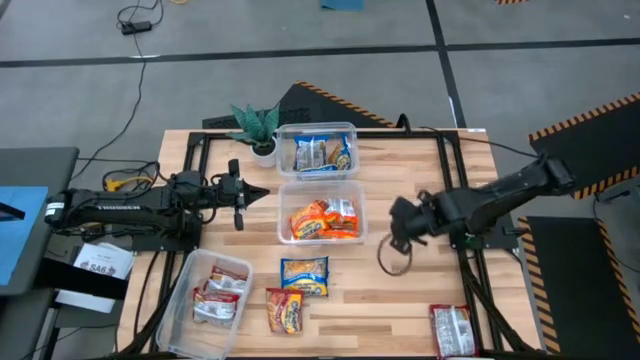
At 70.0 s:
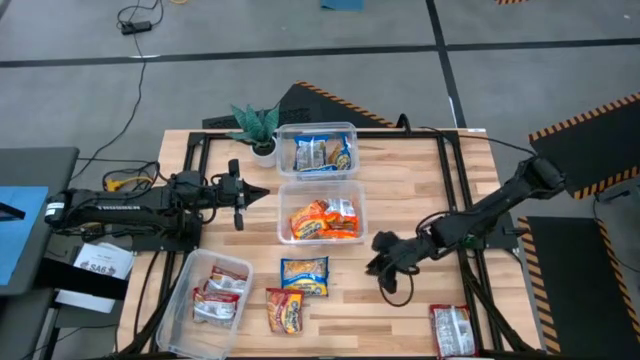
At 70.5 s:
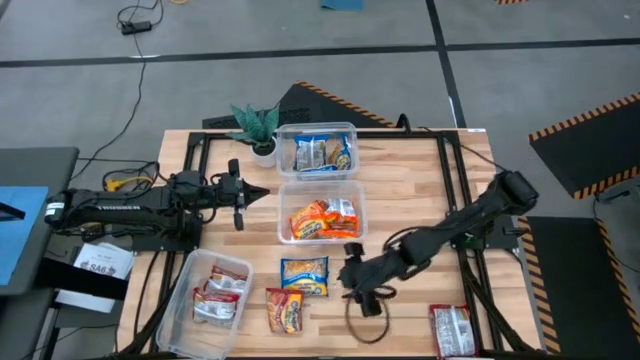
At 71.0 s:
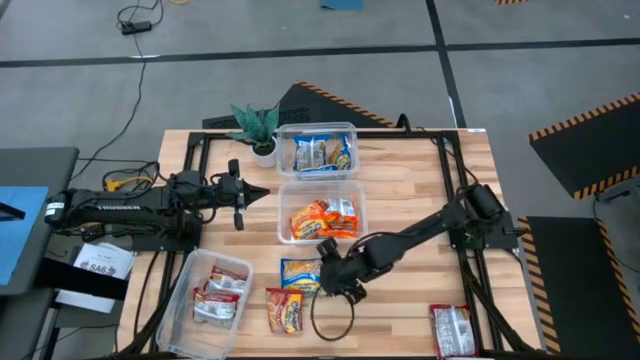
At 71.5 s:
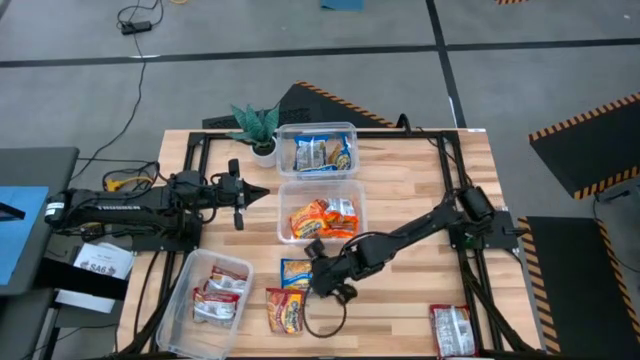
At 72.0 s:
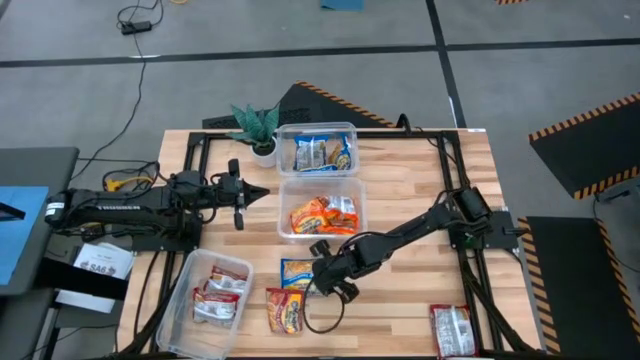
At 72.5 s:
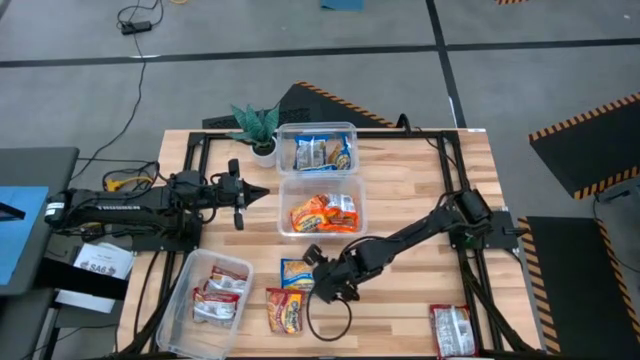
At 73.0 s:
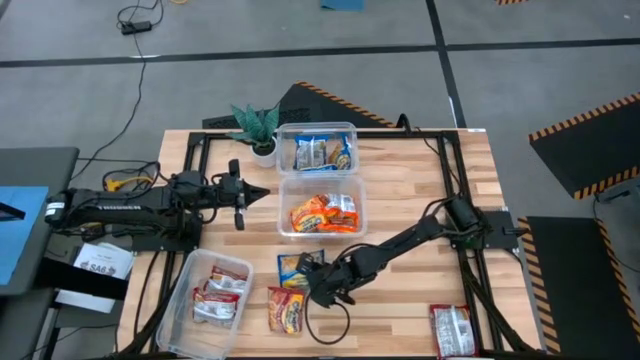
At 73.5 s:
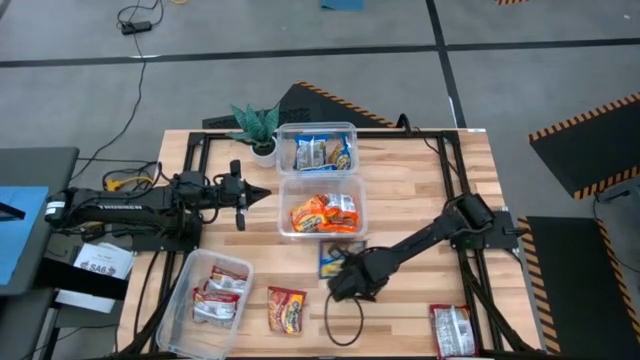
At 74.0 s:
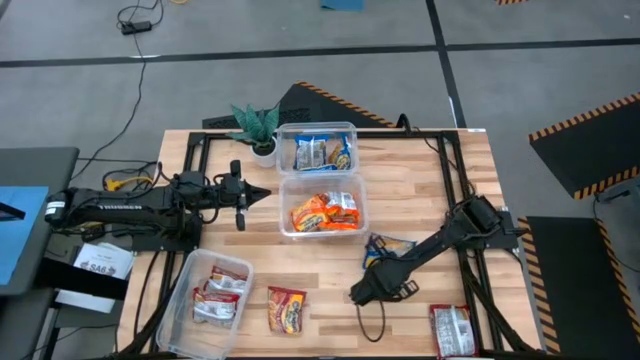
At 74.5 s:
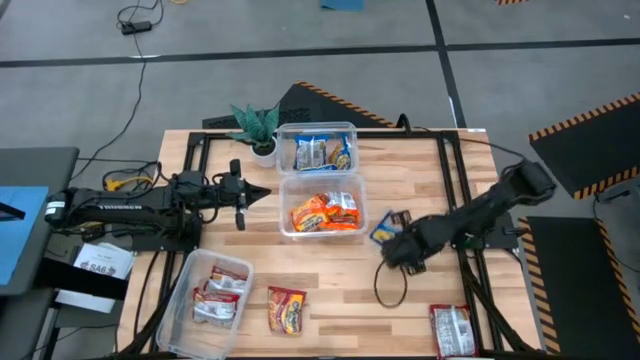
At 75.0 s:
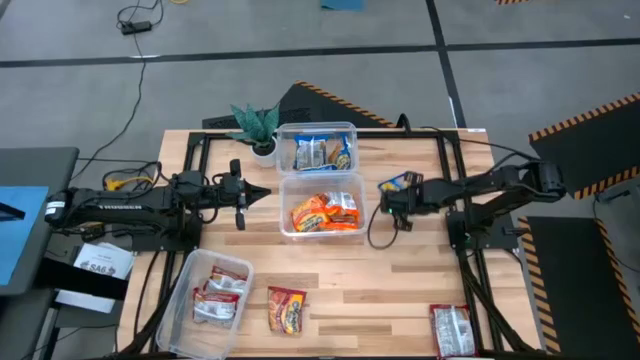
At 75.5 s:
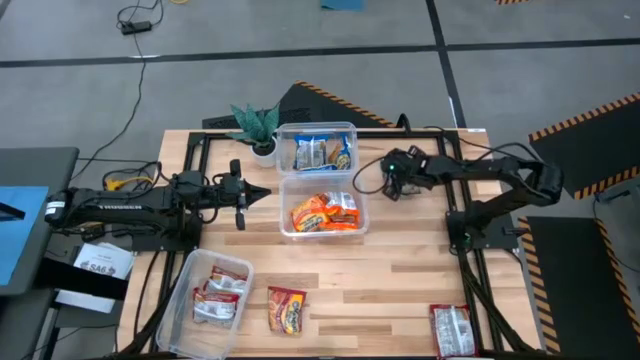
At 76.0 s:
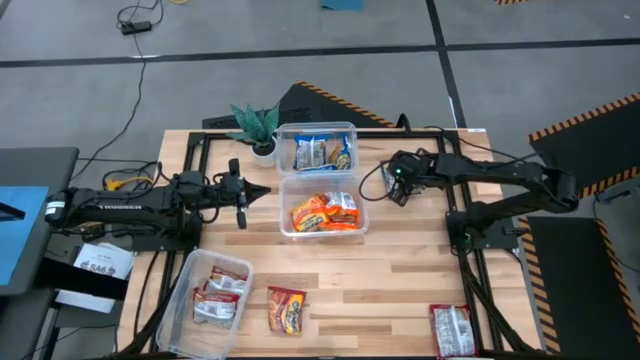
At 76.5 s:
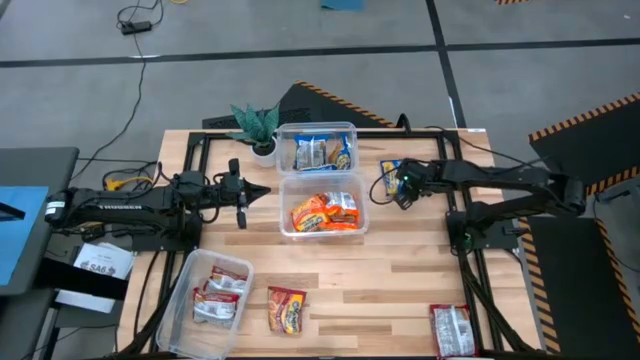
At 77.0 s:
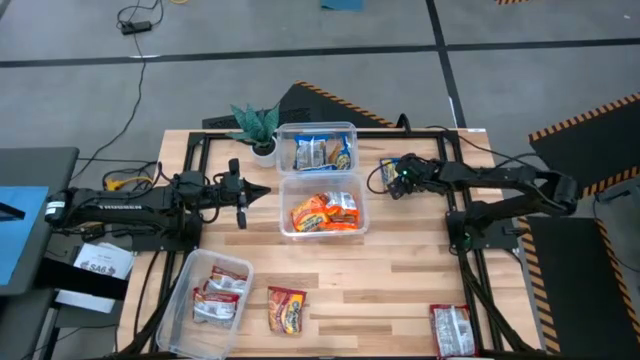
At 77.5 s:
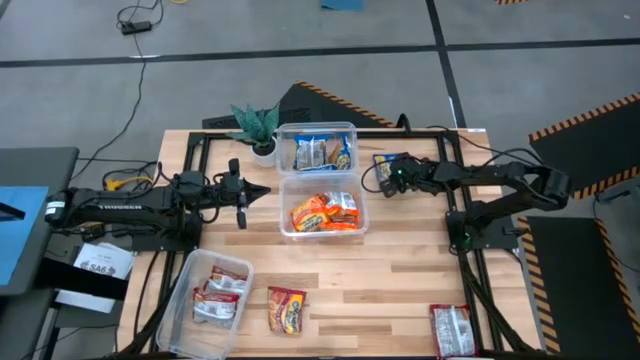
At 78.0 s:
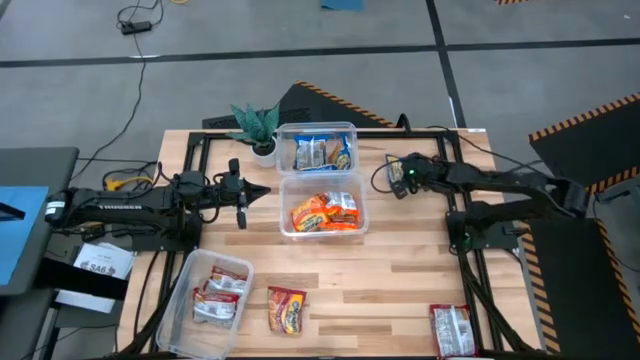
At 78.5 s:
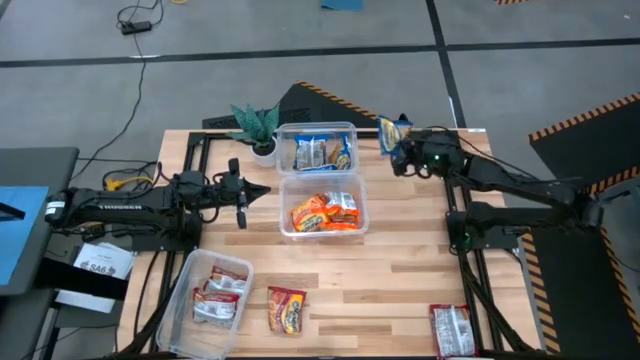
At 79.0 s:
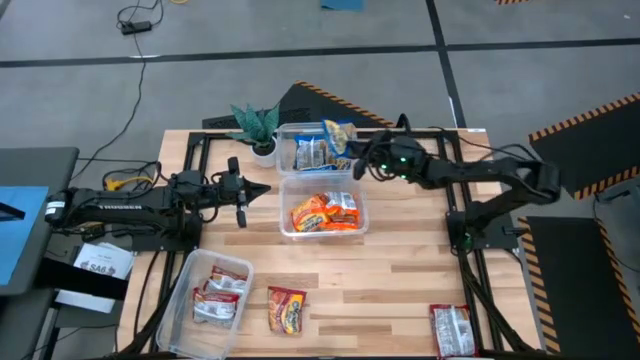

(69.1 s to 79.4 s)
Task: Sort Maruchan noodles
Put the blue noodle pack into the top transparent bin

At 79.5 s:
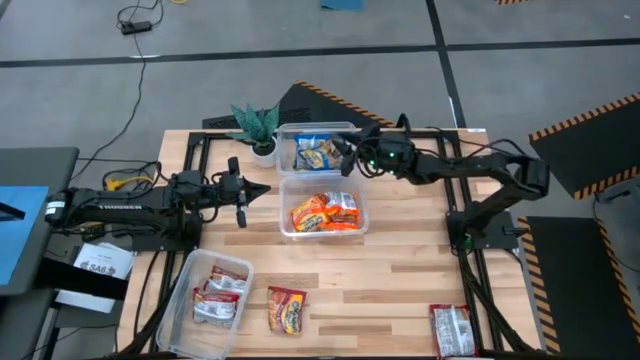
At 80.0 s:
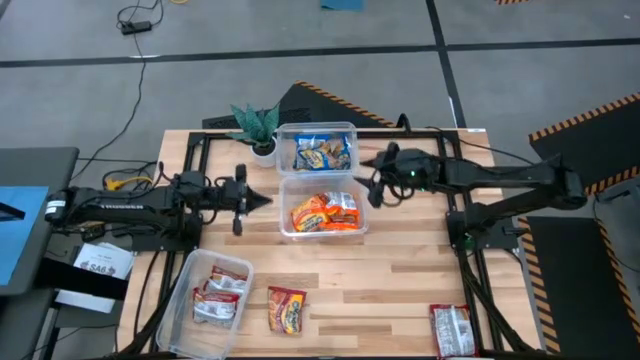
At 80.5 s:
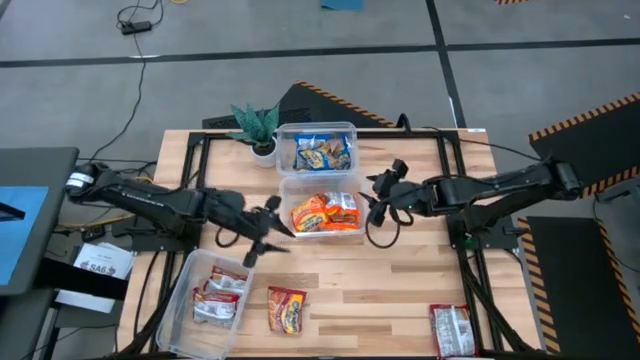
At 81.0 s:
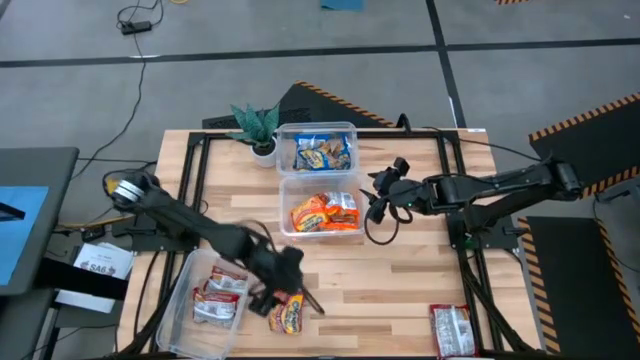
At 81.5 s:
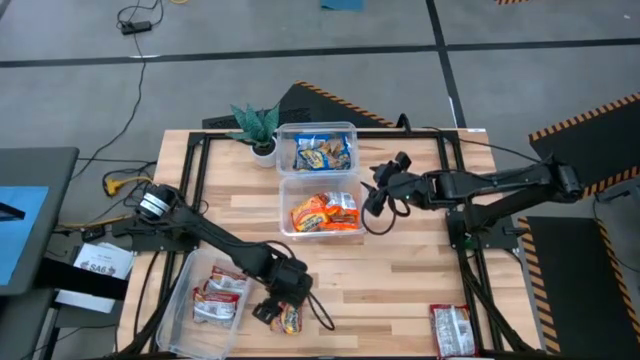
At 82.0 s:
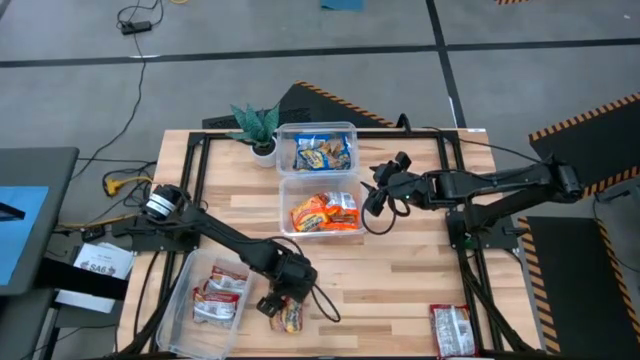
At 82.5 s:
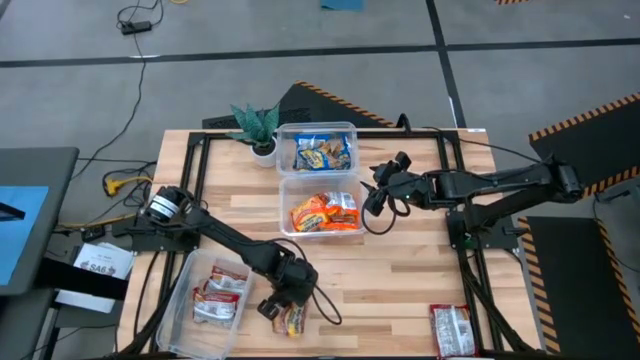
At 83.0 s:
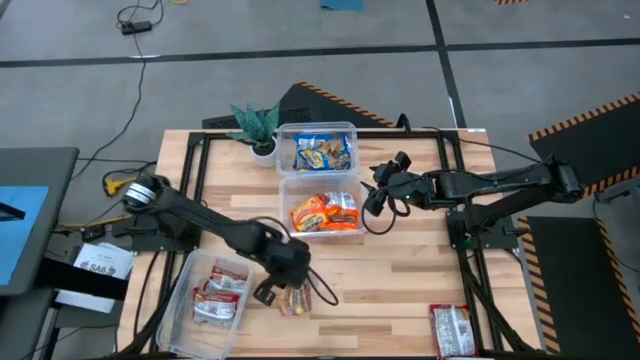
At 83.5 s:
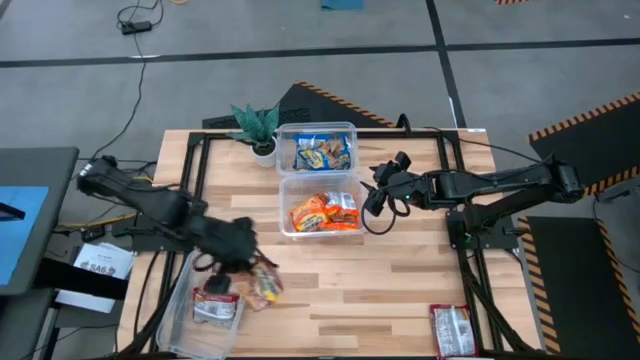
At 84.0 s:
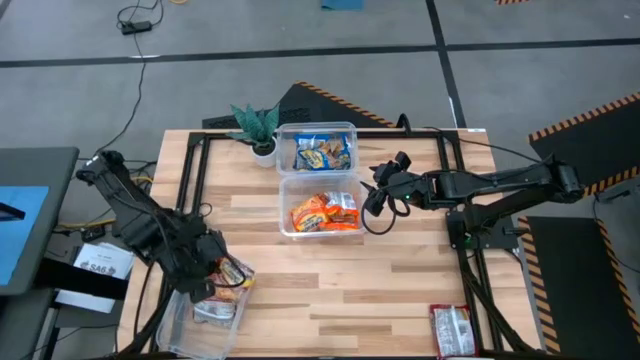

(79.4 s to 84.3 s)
Put the red noodle pack into the bottom transparent bin

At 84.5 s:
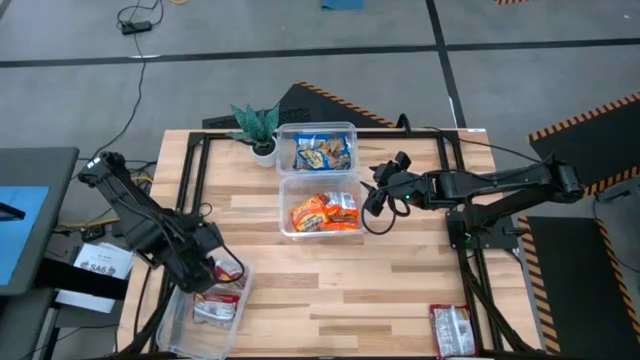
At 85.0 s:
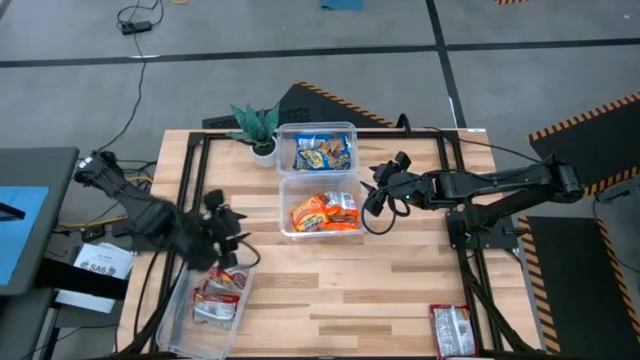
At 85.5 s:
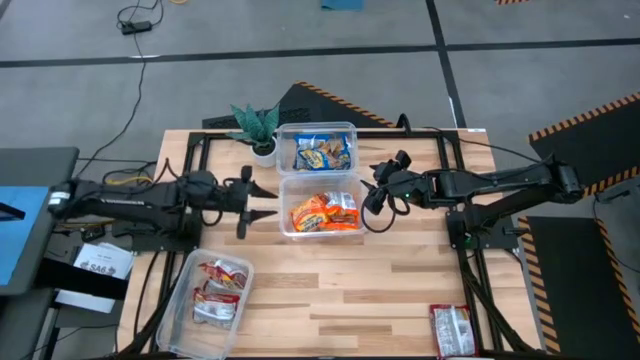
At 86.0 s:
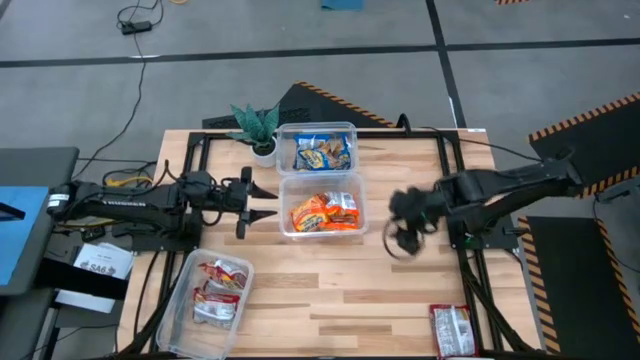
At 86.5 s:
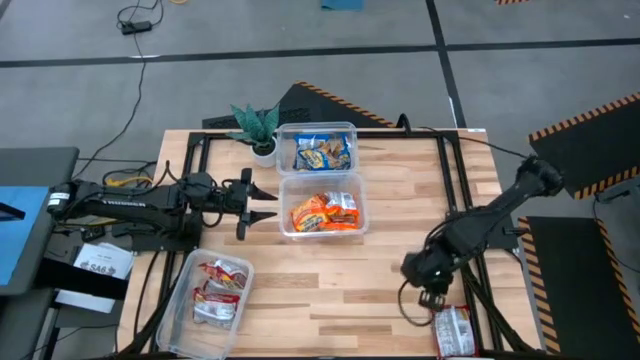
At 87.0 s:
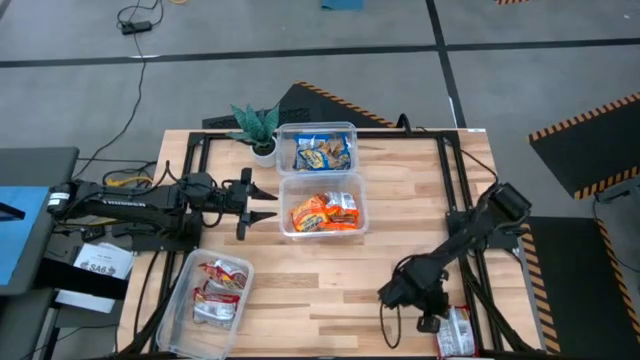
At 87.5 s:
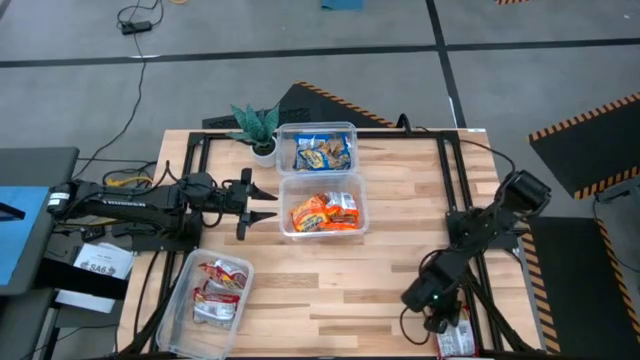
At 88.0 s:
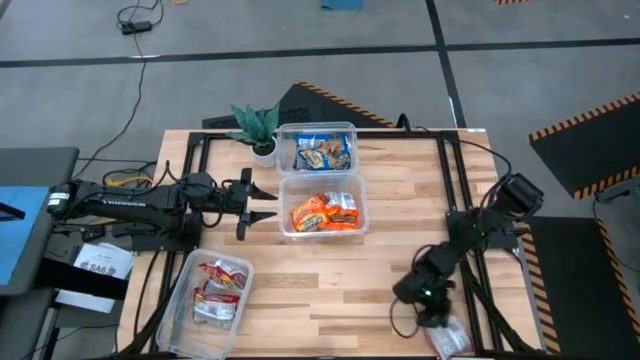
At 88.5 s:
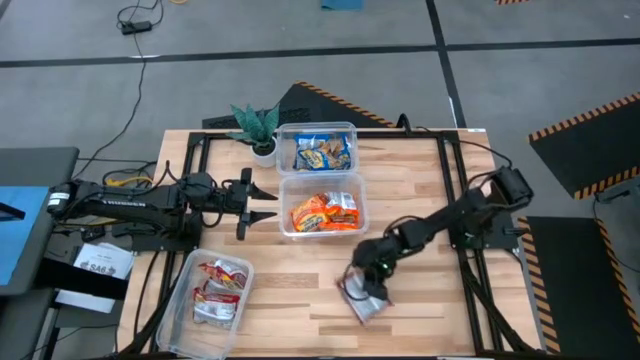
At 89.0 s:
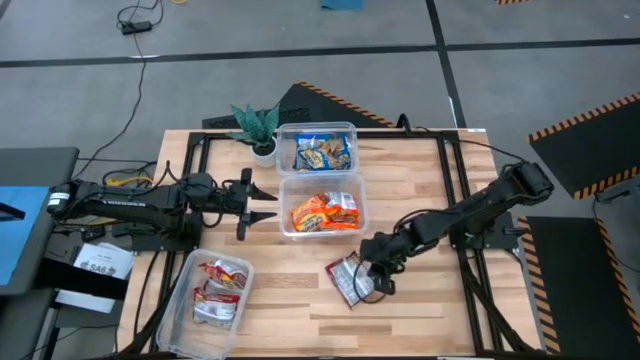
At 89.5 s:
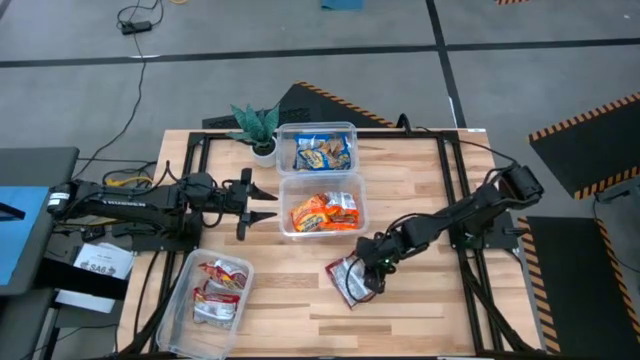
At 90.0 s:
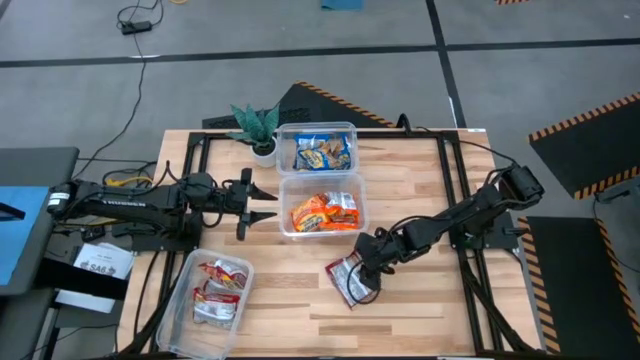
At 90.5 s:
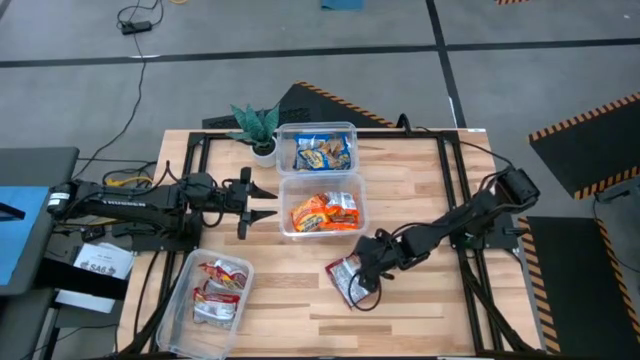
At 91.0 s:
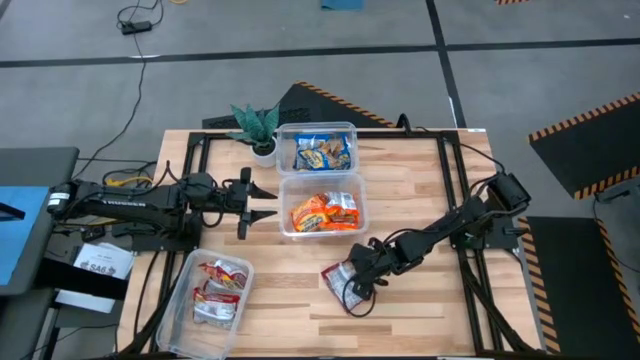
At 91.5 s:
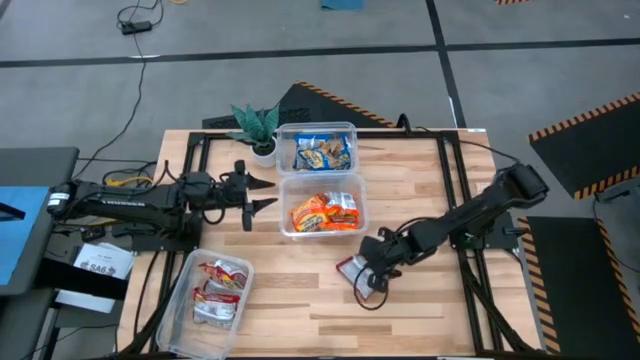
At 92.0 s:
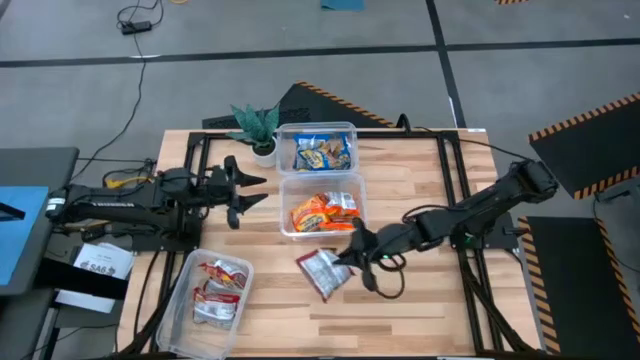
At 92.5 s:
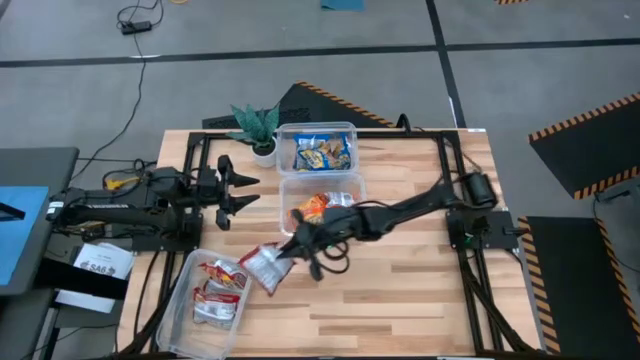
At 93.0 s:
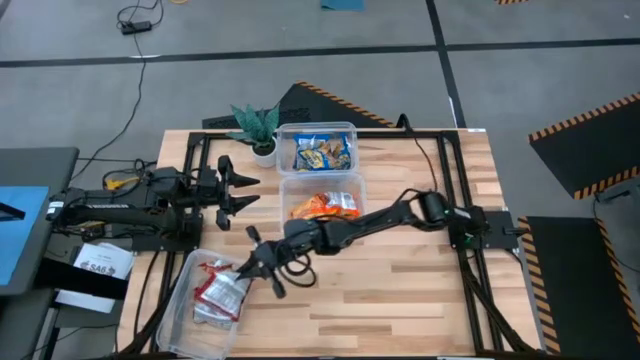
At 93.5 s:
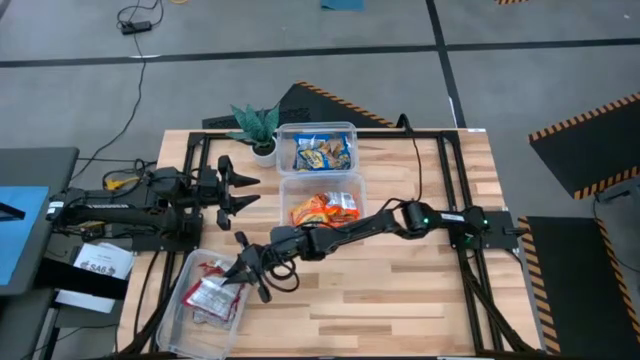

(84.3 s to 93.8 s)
Put the red noodle pack into the bottom transparent bin
